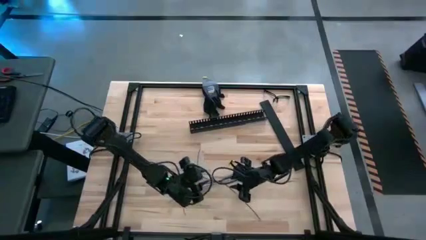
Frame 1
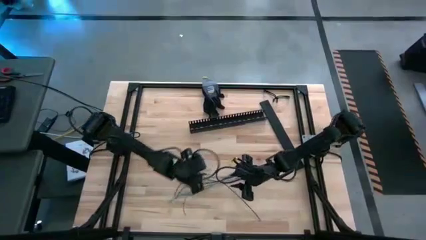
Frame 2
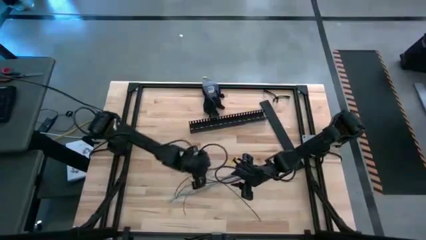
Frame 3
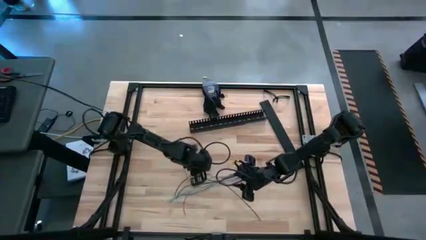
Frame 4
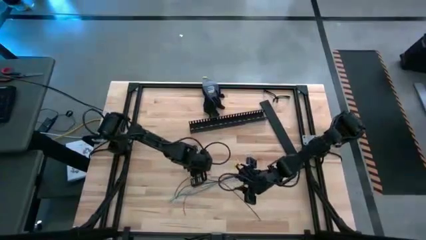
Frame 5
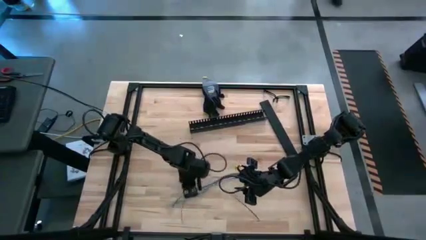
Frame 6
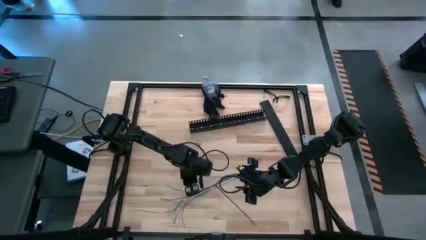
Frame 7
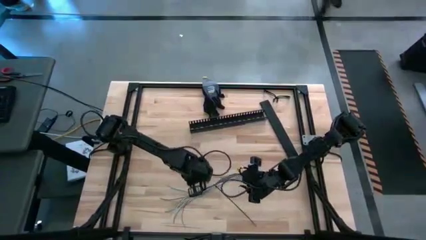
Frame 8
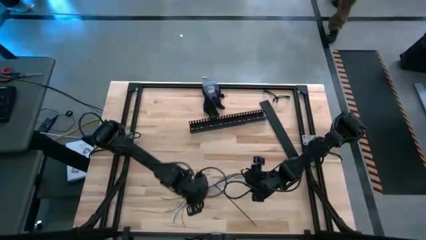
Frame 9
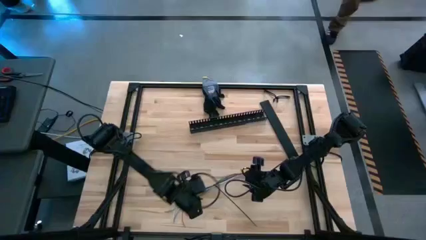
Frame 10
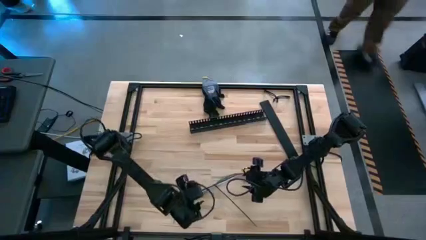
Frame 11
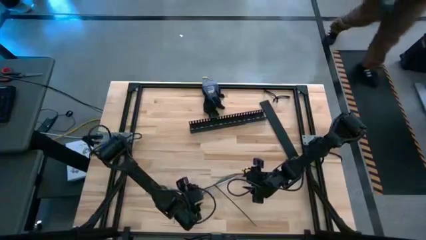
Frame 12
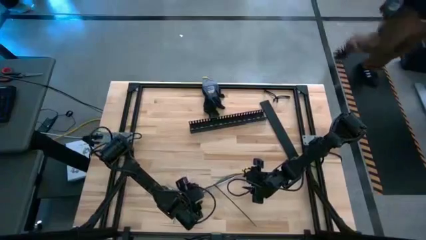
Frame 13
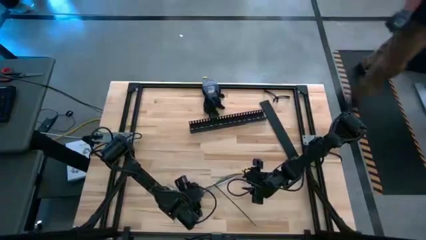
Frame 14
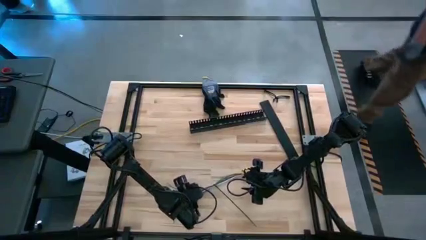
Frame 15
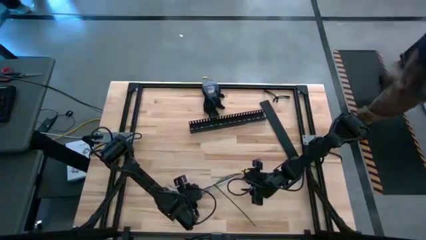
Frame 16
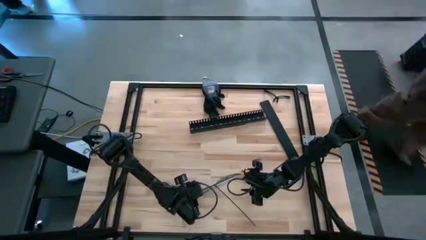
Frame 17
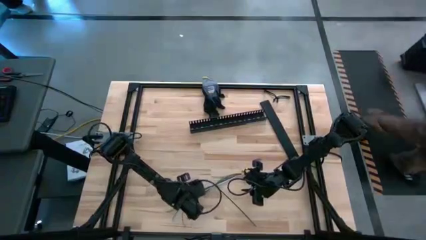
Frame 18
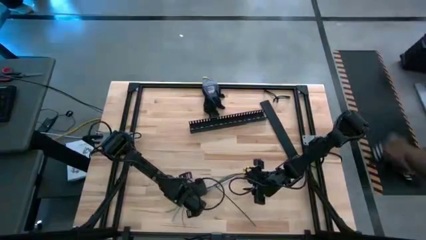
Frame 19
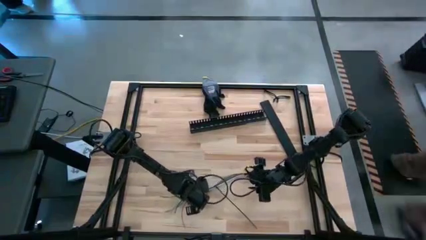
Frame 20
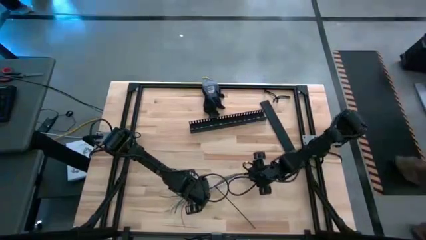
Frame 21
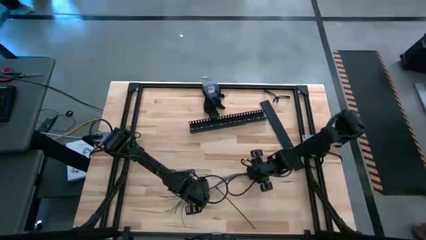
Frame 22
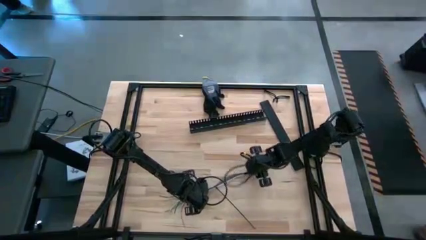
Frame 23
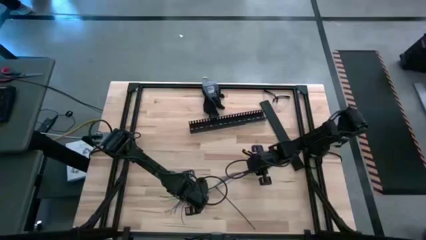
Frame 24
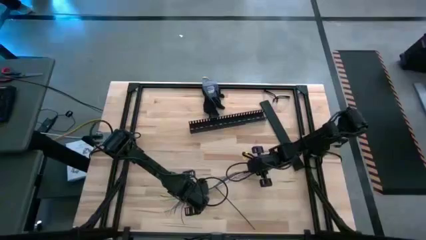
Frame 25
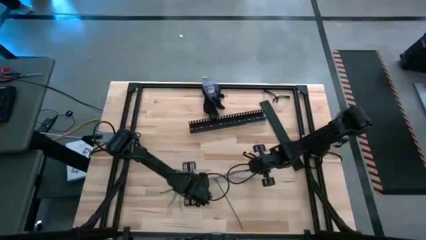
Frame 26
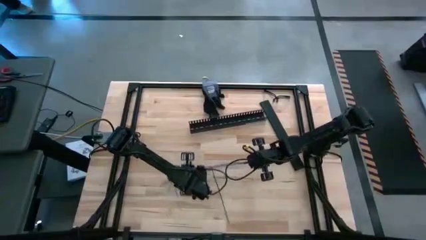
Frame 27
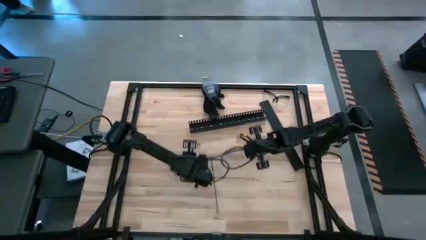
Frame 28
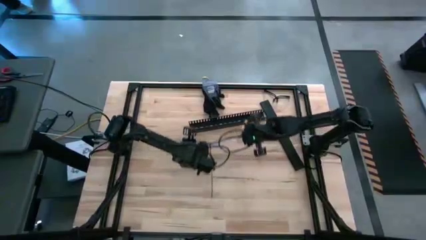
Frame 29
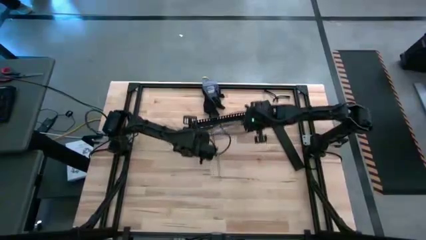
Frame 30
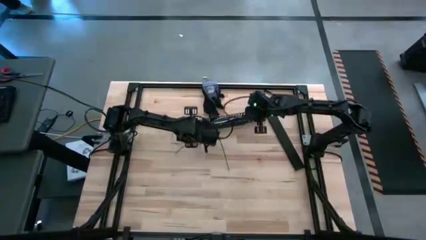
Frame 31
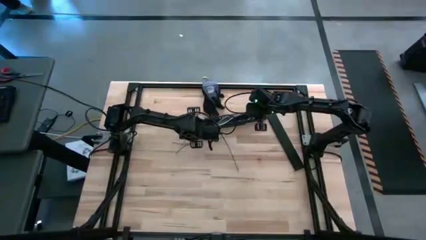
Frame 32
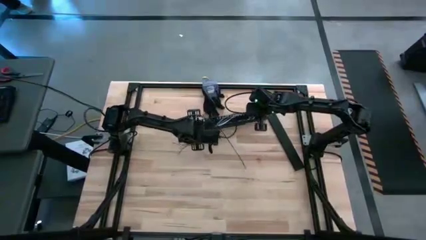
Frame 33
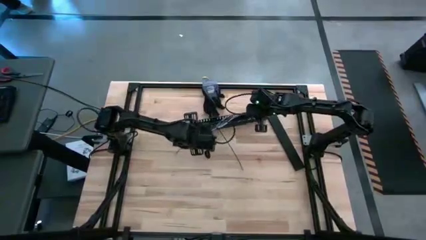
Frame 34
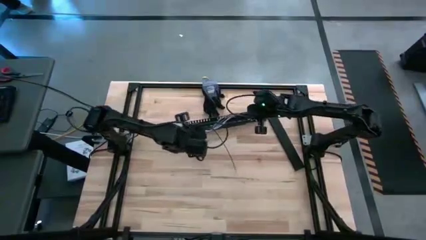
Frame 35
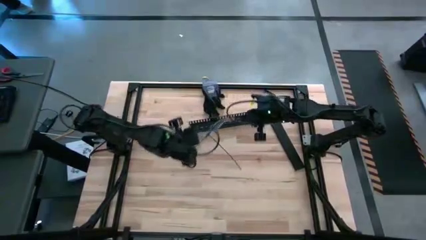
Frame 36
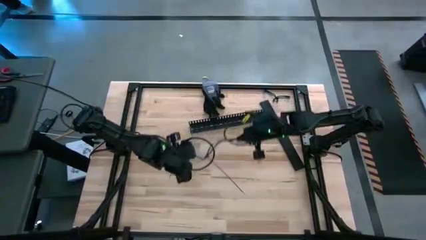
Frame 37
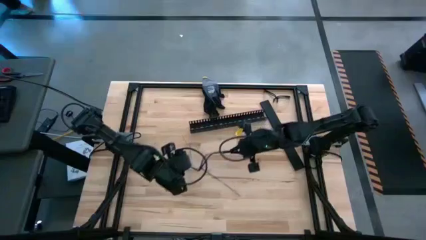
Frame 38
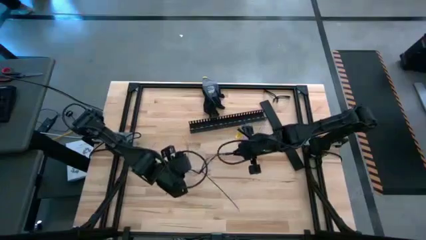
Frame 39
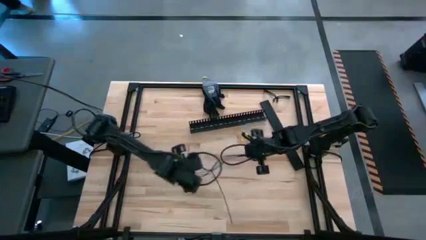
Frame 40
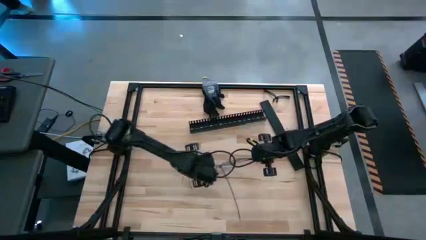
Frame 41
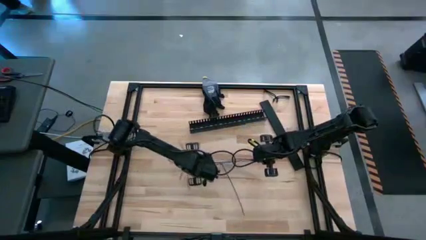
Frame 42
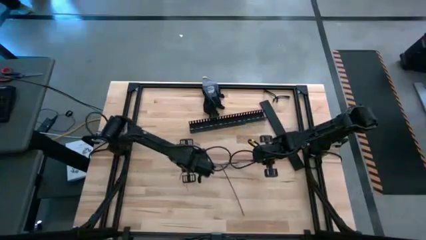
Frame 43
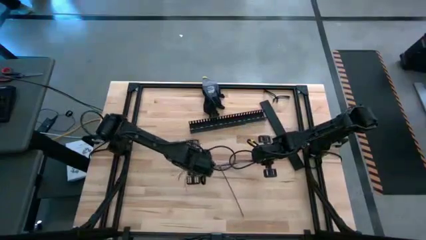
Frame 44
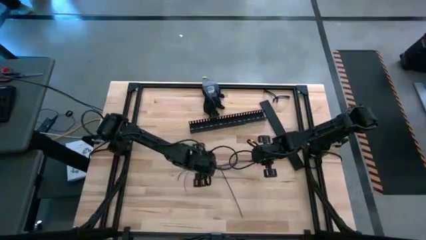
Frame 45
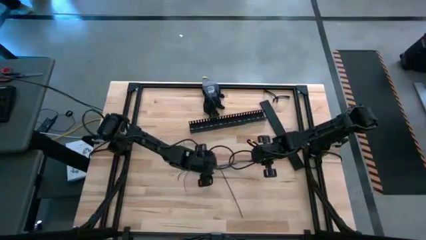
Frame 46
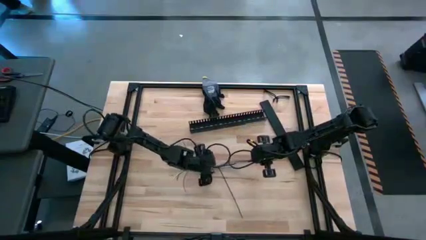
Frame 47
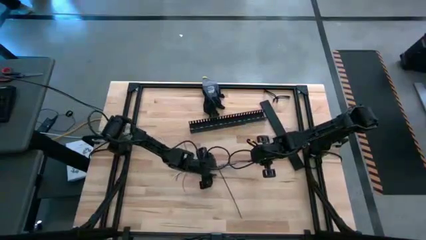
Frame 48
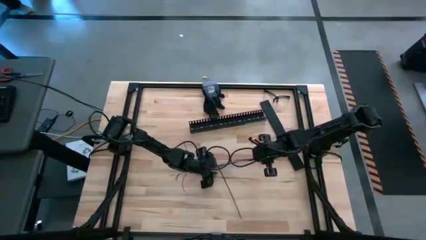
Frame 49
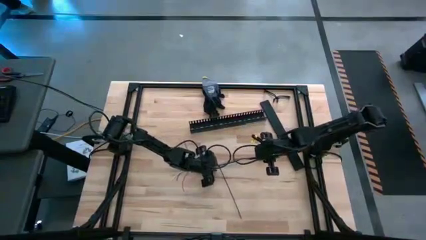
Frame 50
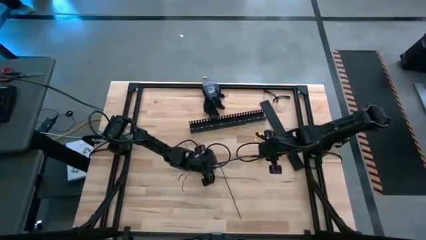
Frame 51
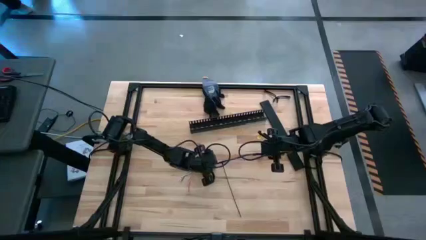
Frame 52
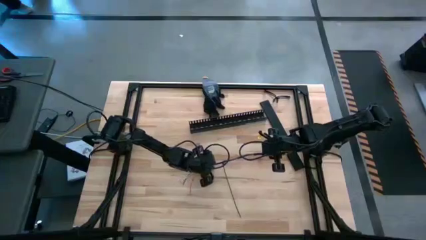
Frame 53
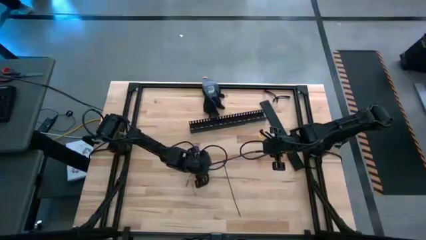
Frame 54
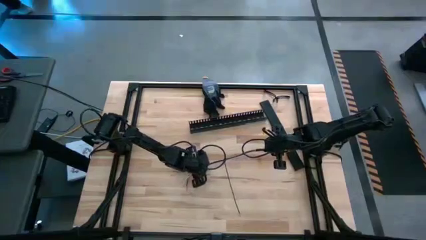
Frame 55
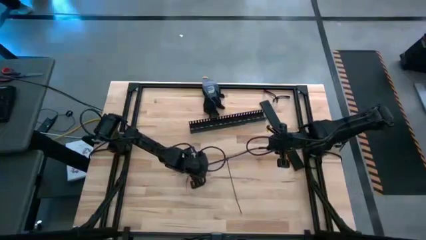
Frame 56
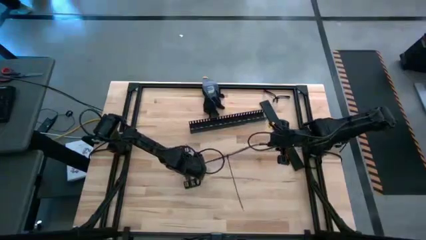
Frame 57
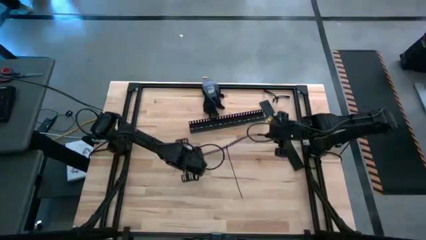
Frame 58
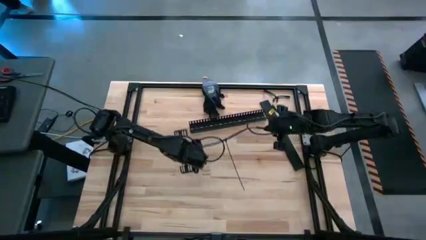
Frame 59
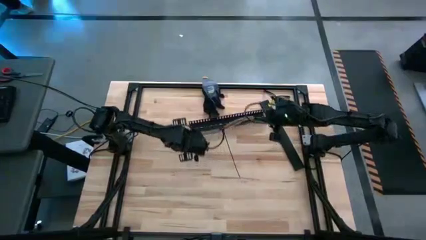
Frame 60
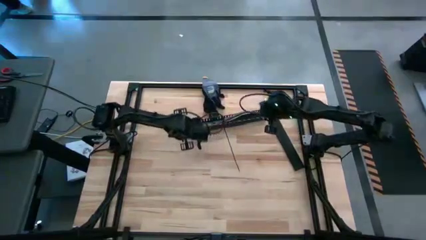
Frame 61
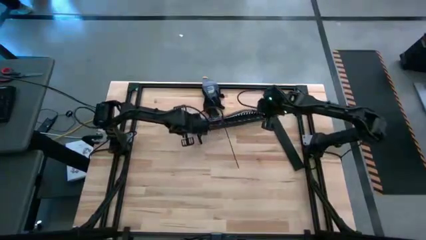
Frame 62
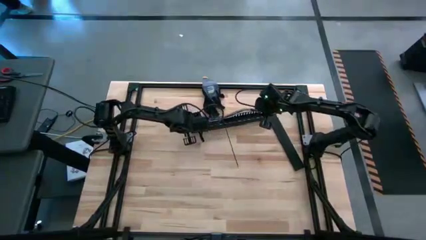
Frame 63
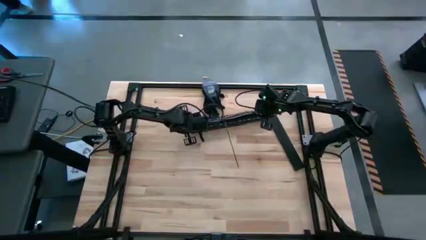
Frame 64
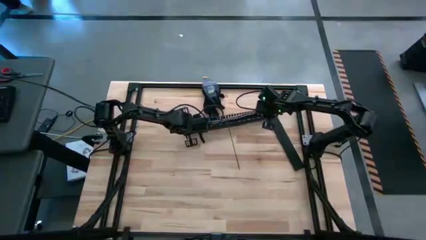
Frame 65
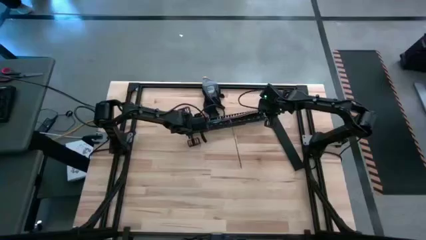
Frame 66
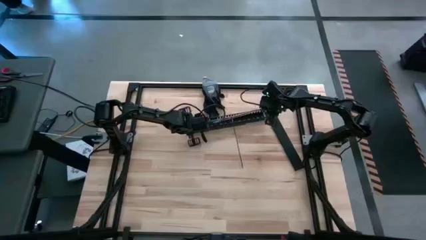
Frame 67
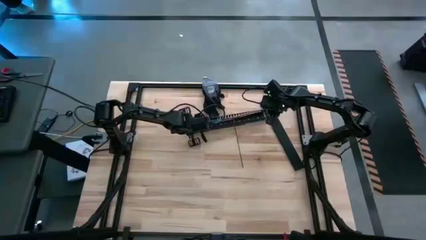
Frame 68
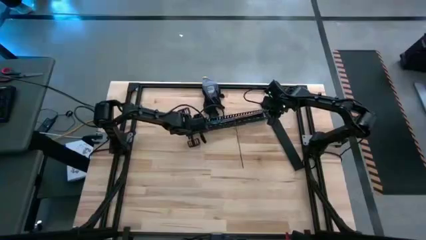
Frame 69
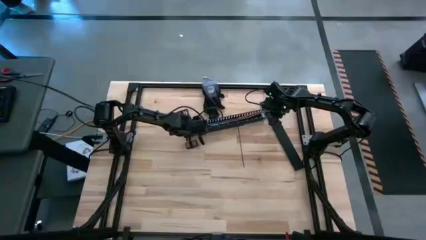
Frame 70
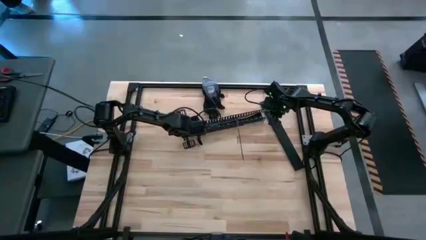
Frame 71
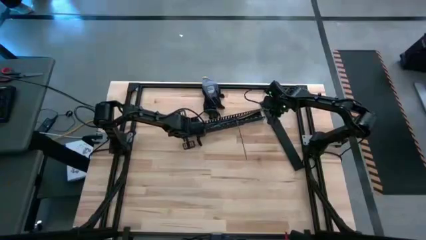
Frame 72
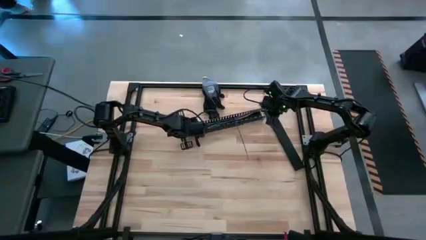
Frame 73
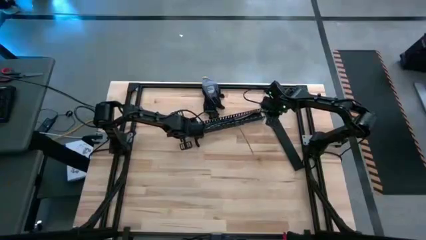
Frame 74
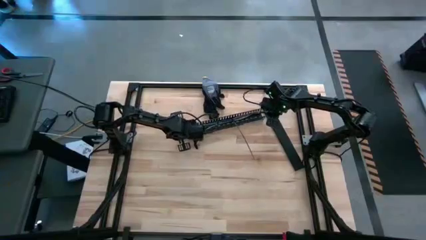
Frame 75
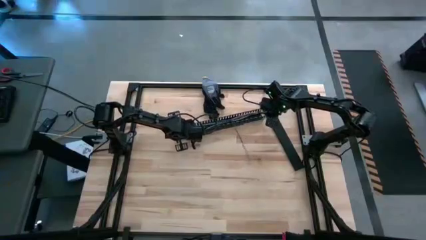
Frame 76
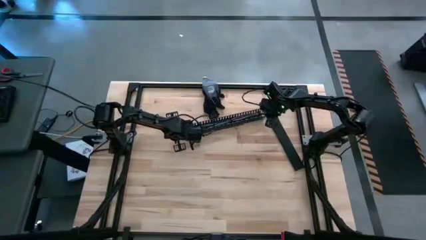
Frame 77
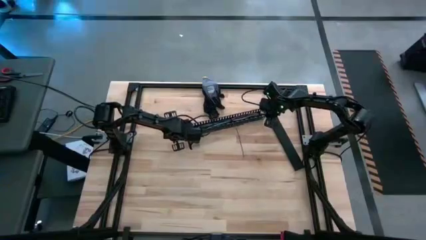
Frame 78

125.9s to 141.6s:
Task: Ziptie cables
Put the colored ziptied cables into the black cable duct

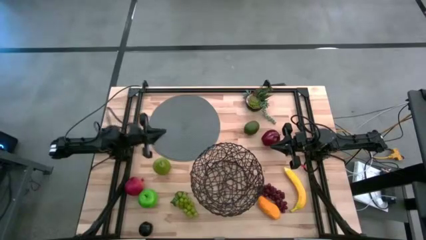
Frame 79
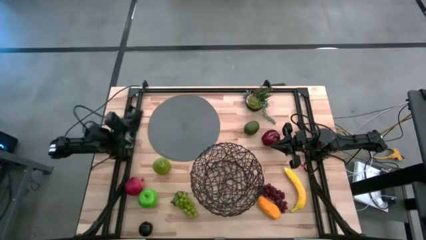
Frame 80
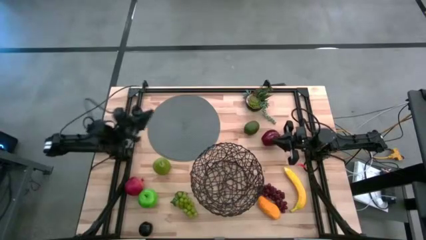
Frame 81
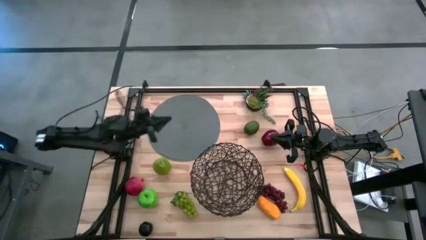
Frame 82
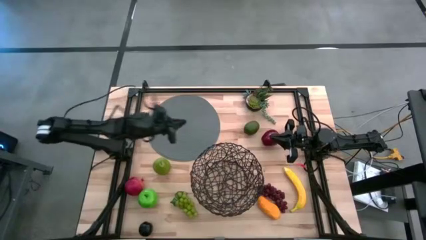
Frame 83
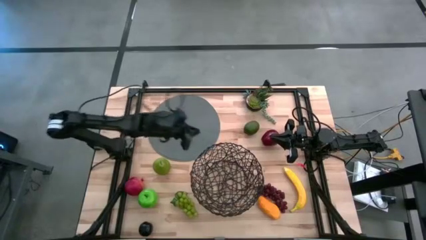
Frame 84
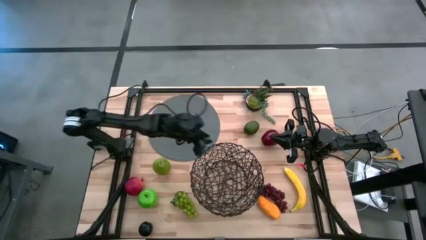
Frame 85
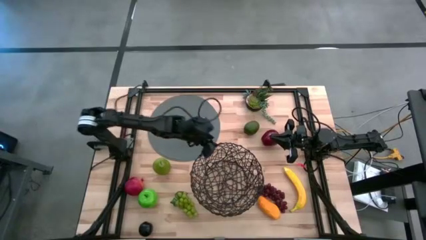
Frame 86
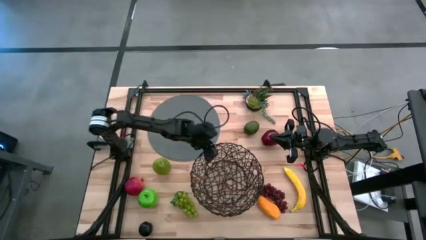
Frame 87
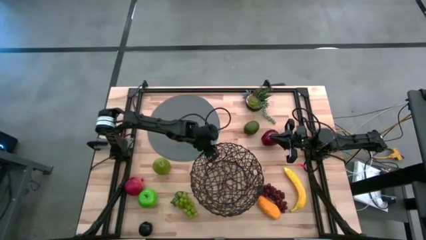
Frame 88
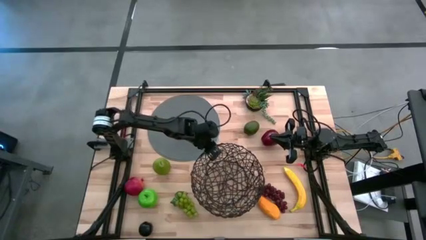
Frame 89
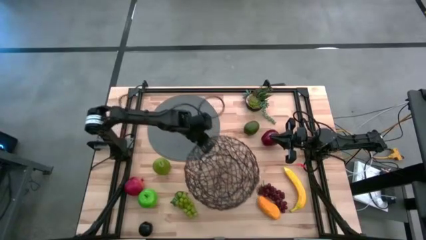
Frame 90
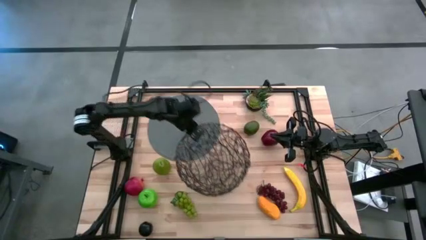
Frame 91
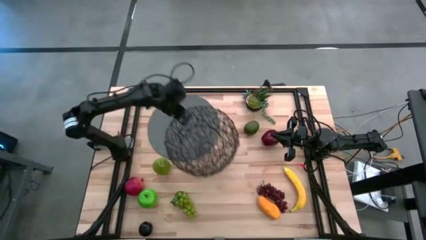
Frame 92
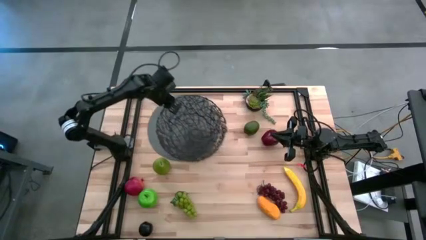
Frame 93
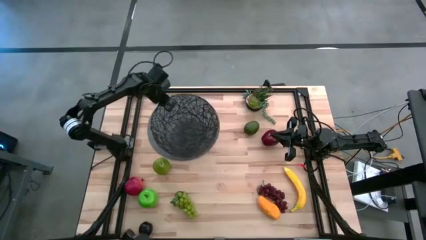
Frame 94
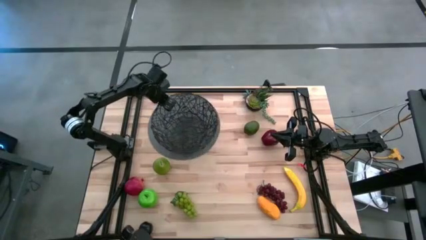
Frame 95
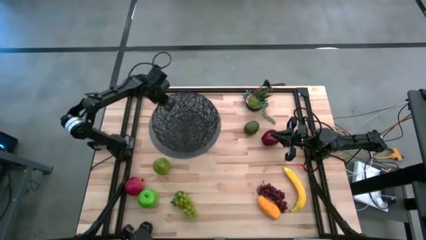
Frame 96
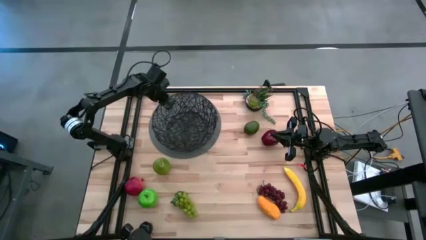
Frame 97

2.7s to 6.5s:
Task: Build produce basket
Prepare the black wire basket
